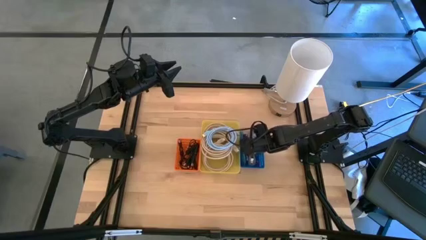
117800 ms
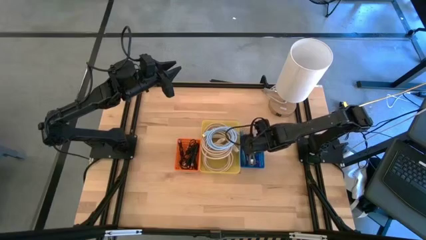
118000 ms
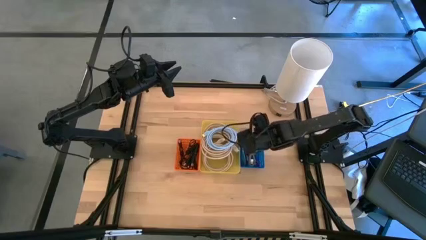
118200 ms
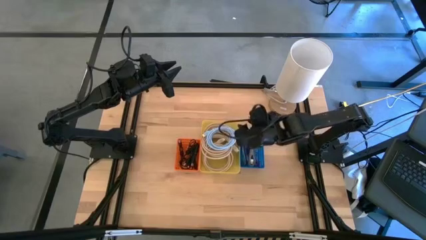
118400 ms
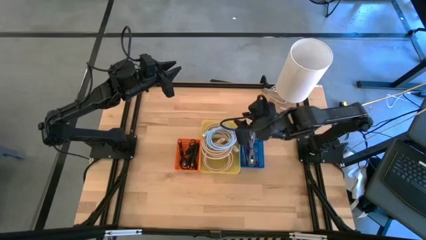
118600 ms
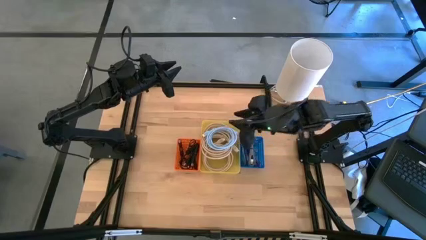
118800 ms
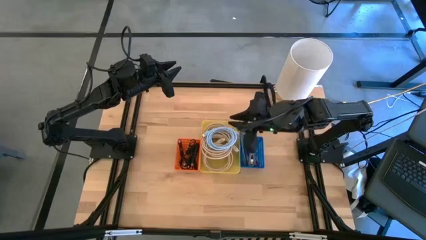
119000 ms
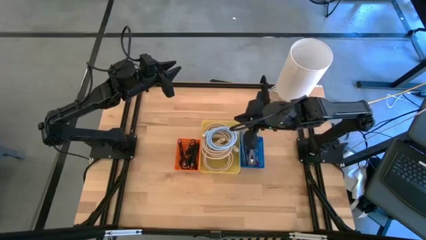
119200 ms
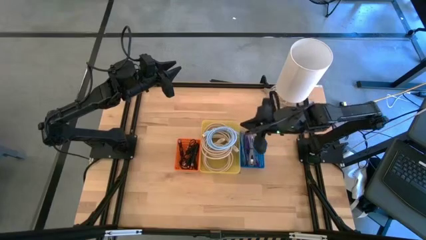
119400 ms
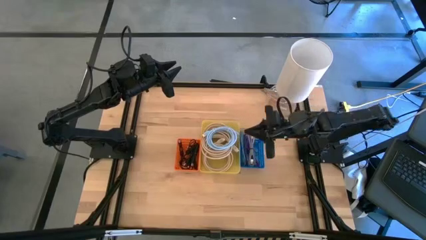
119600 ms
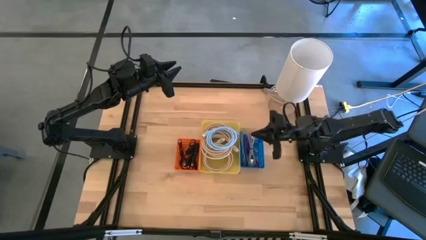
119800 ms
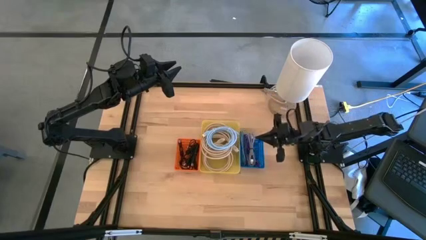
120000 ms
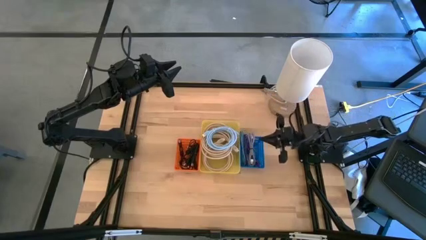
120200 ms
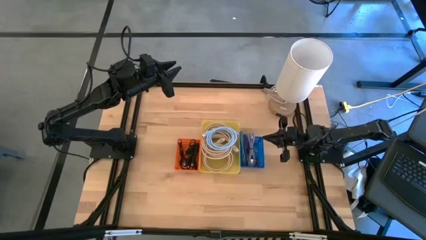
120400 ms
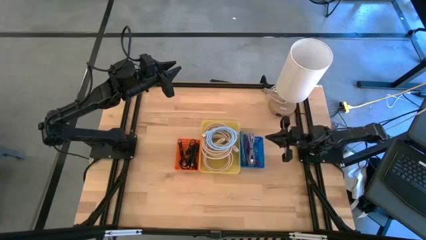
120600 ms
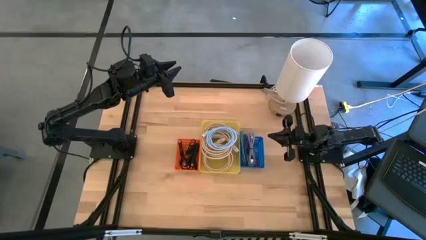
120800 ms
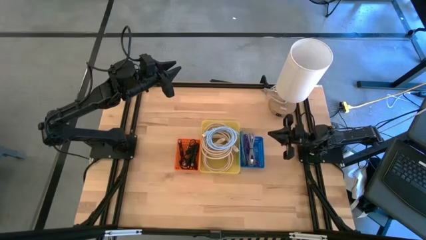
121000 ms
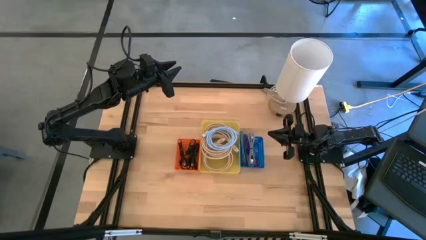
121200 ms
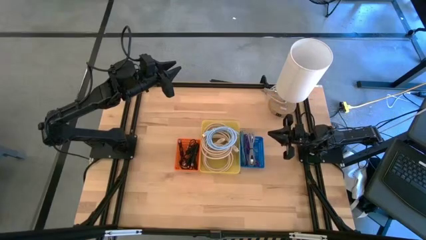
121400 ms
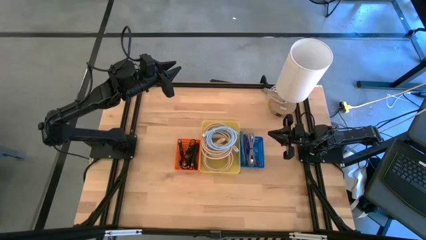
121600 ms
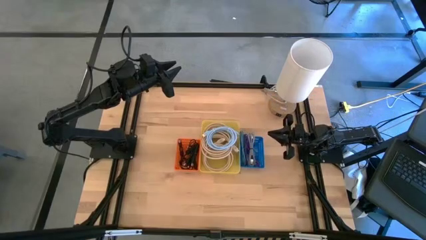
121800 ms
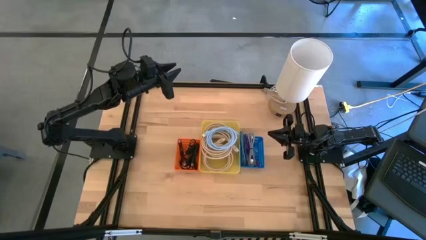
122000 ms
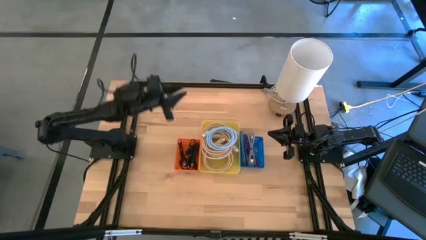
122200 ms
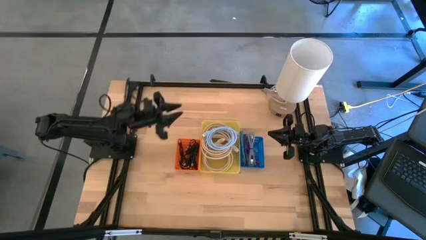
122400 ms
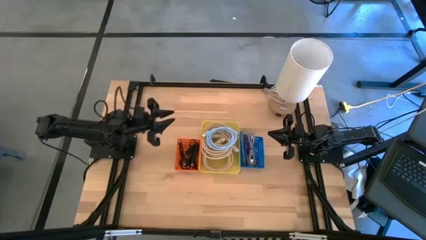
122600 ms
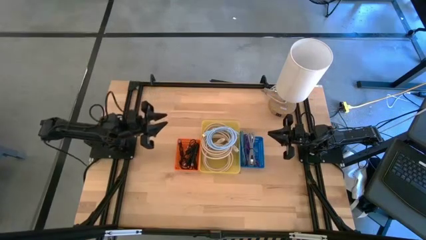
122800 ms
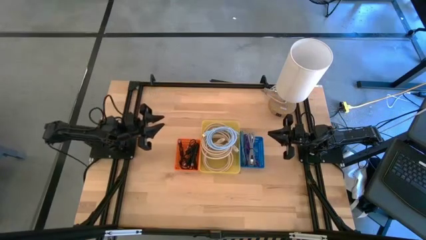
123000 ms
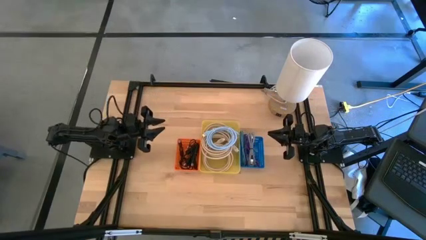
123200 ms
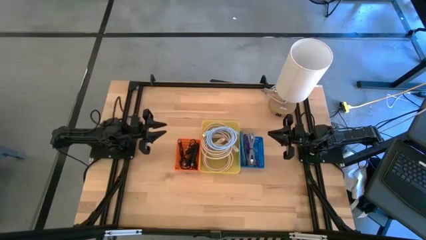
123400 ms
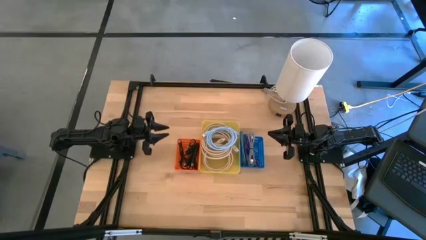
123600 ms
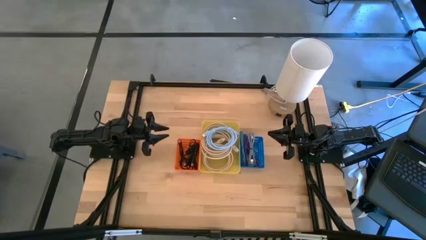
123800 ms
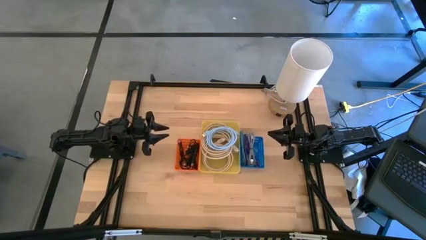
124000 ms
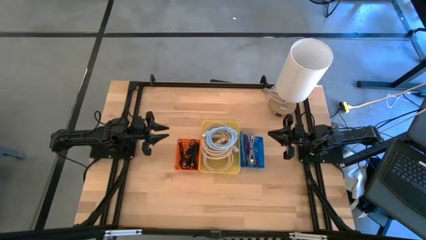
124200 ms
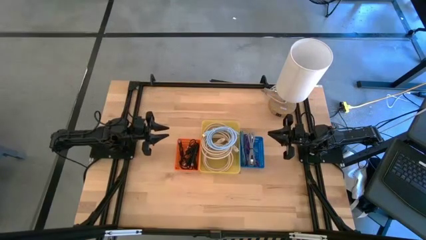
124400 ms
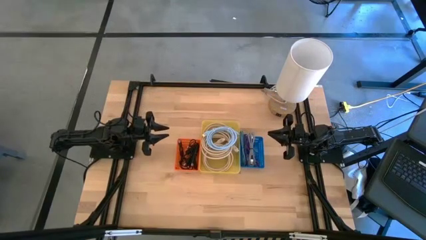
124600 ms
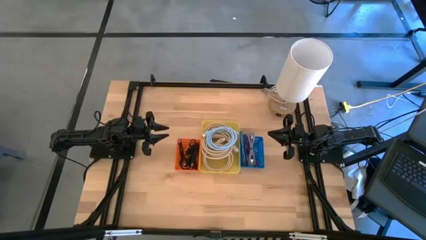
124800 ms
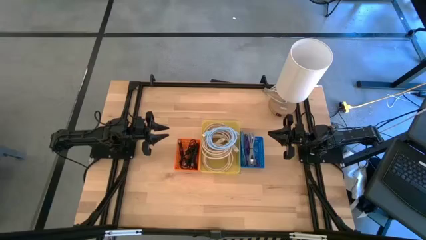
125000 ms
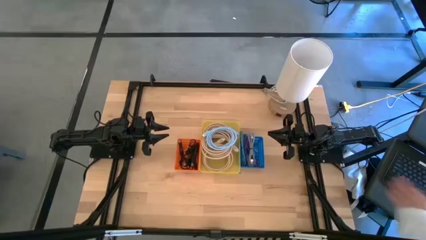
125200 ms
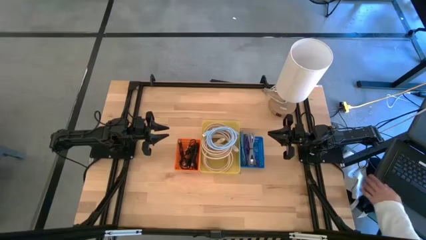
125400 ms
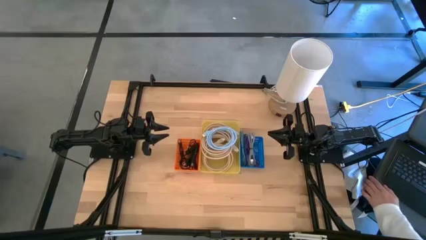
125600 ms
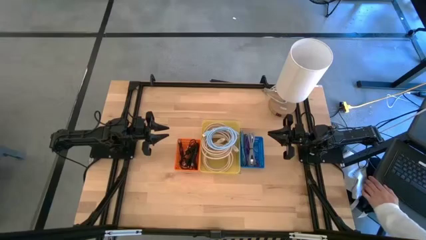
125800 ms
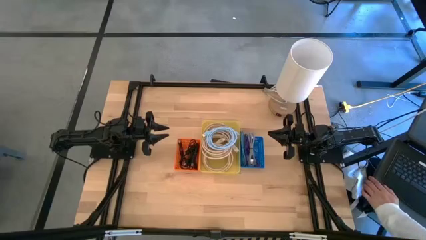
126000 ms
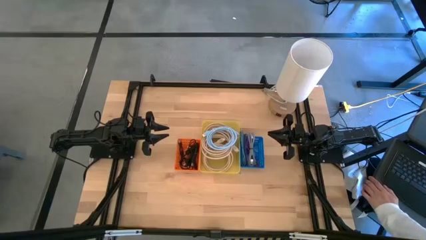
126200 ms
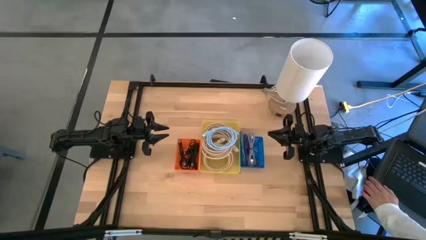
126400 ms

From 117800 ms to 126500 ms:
Task: Pick & Place USB Port
Return to Home Position

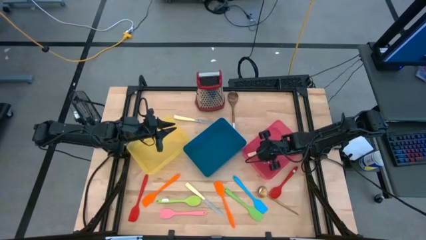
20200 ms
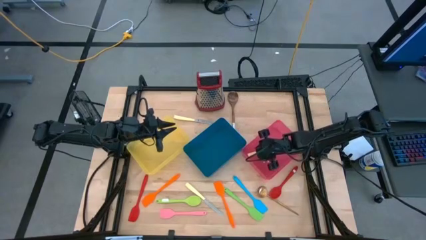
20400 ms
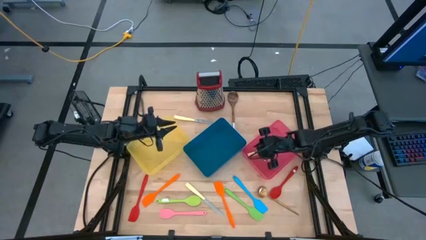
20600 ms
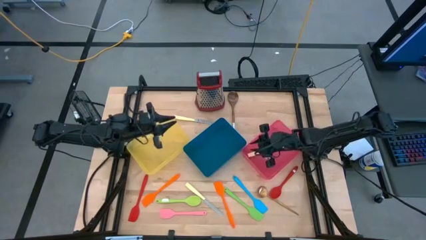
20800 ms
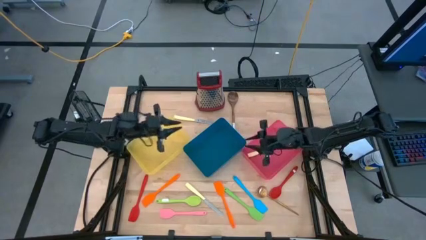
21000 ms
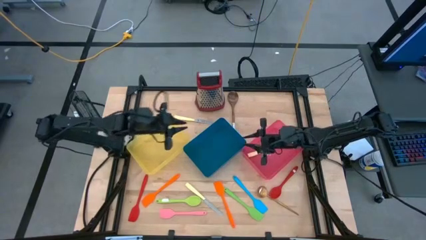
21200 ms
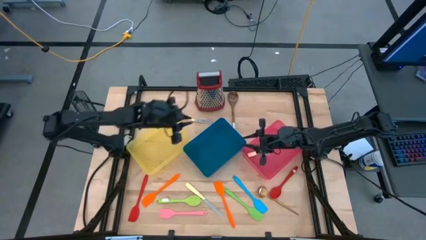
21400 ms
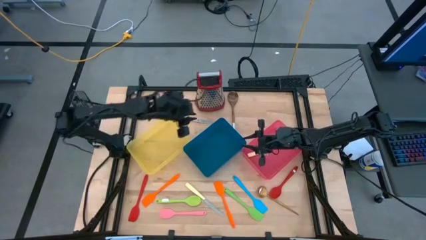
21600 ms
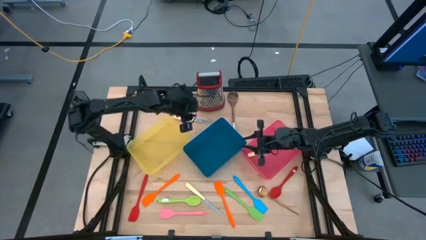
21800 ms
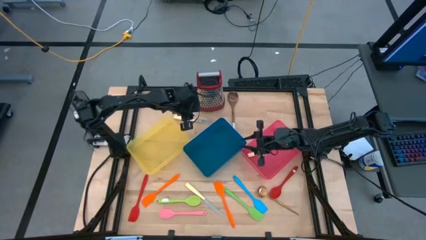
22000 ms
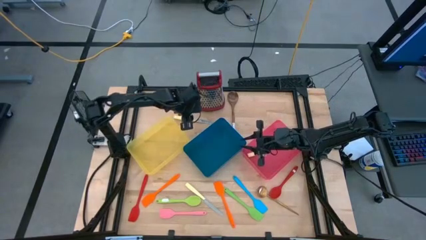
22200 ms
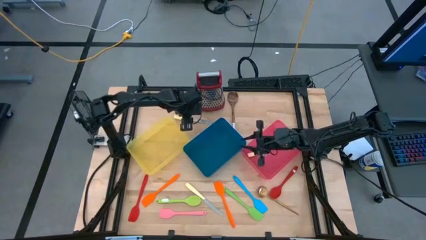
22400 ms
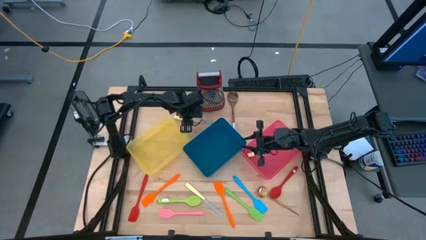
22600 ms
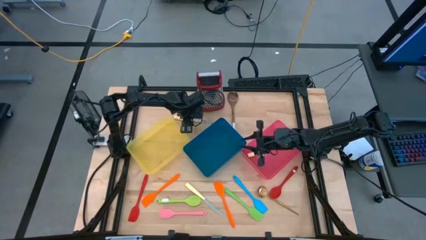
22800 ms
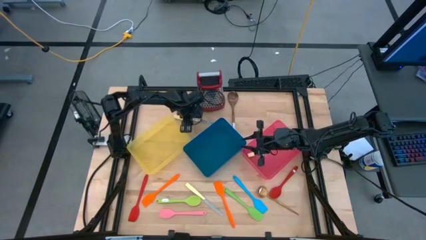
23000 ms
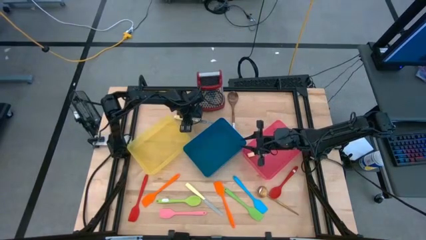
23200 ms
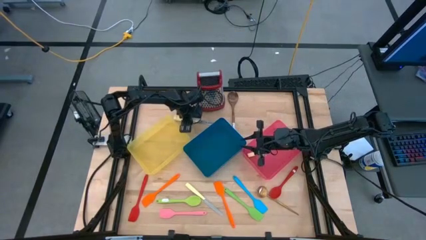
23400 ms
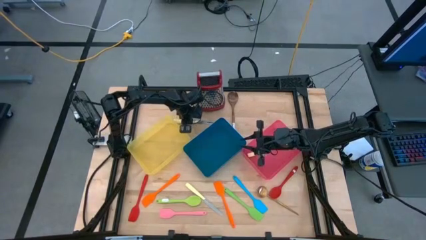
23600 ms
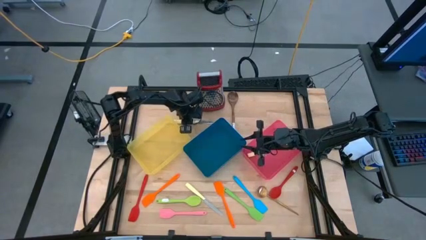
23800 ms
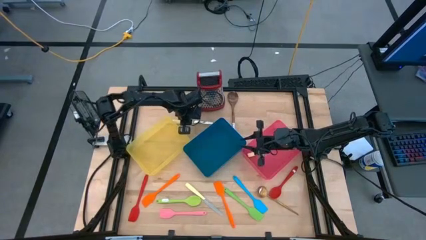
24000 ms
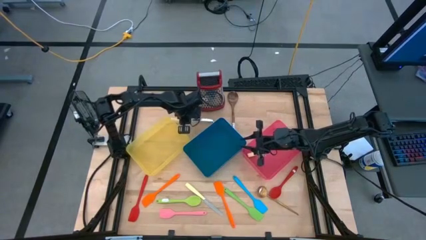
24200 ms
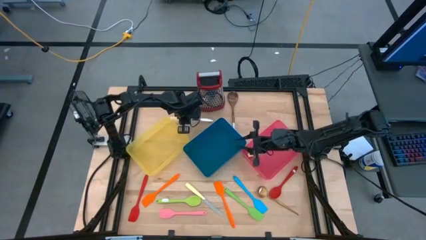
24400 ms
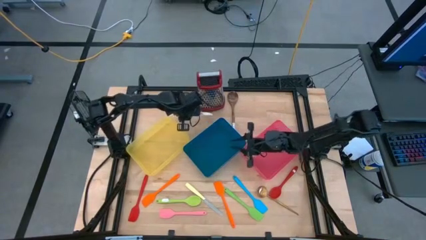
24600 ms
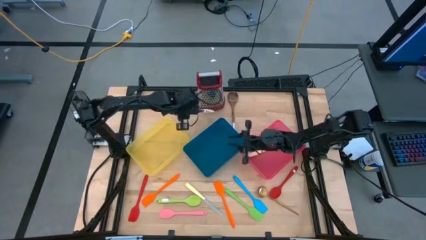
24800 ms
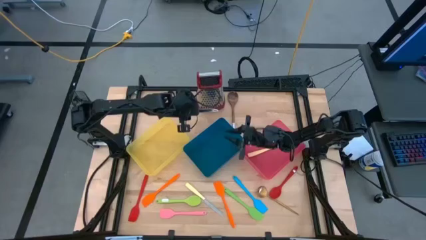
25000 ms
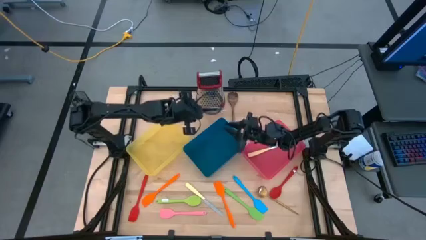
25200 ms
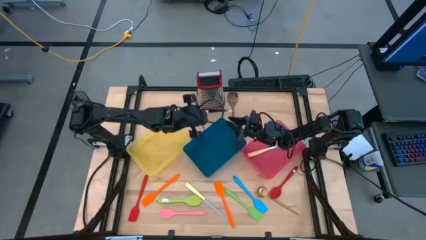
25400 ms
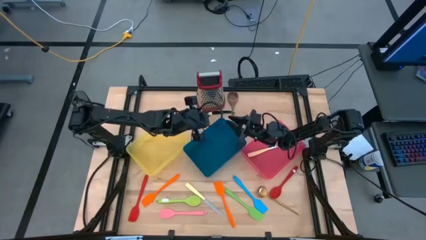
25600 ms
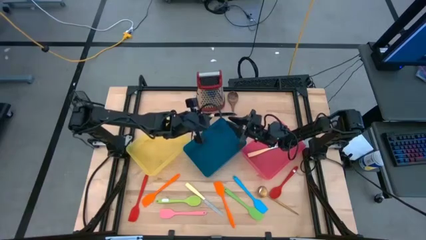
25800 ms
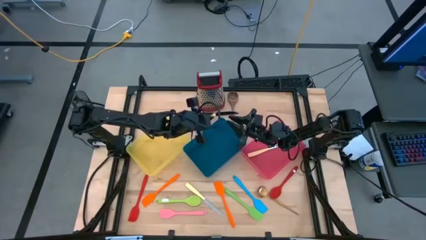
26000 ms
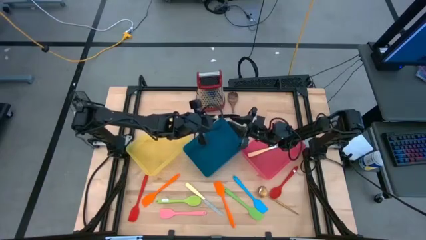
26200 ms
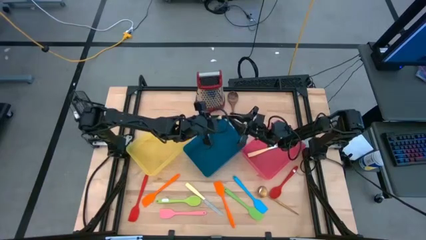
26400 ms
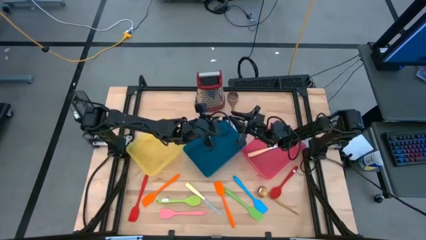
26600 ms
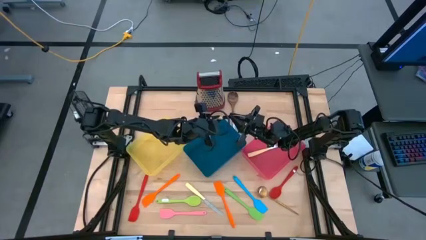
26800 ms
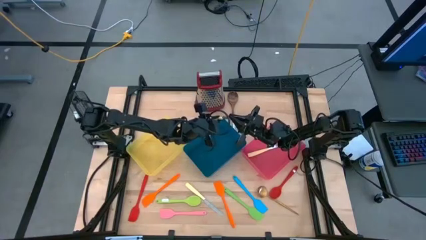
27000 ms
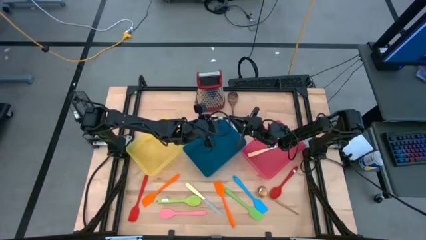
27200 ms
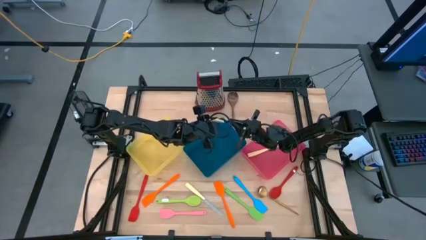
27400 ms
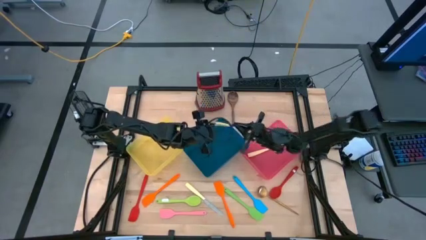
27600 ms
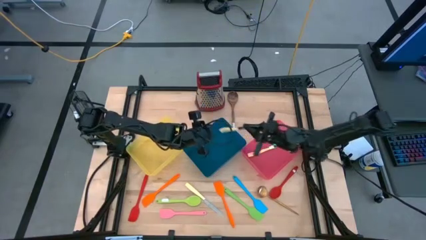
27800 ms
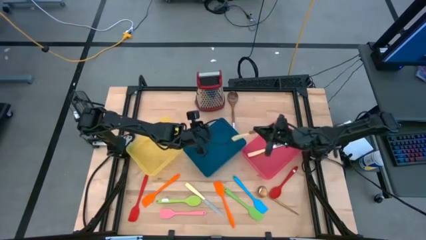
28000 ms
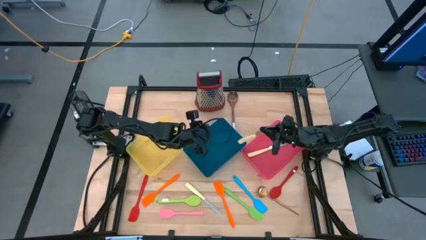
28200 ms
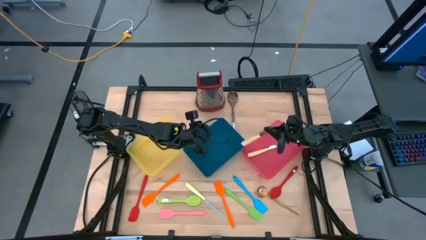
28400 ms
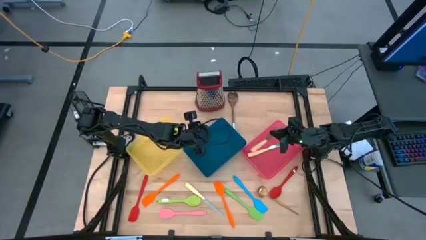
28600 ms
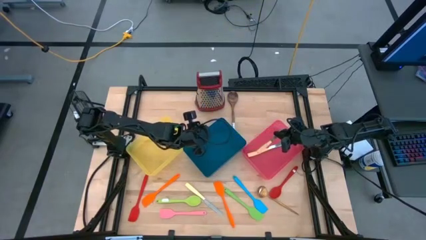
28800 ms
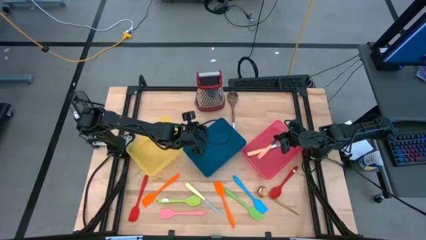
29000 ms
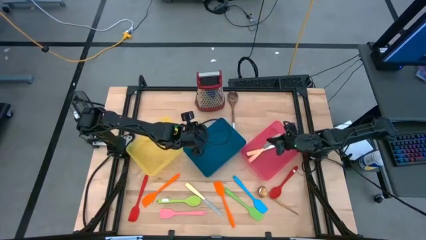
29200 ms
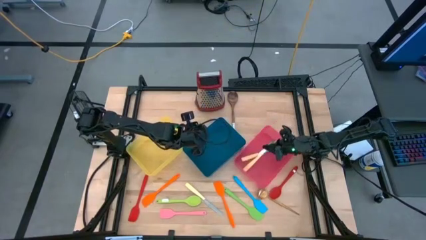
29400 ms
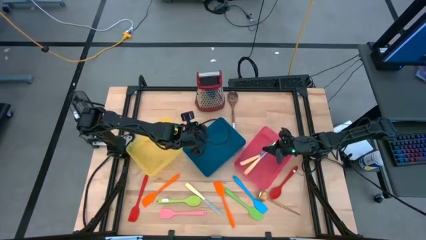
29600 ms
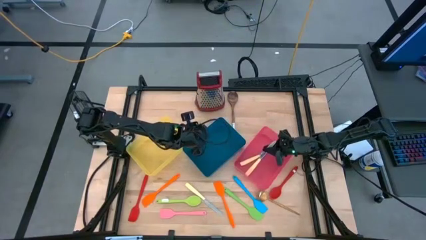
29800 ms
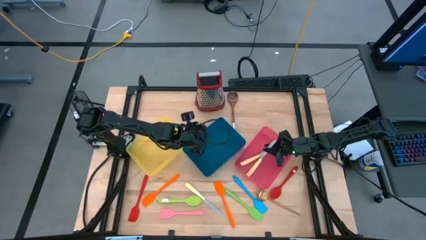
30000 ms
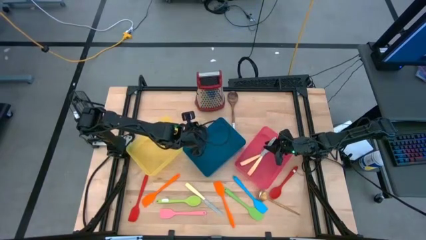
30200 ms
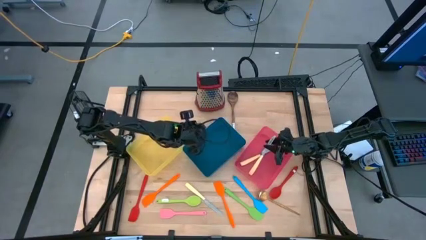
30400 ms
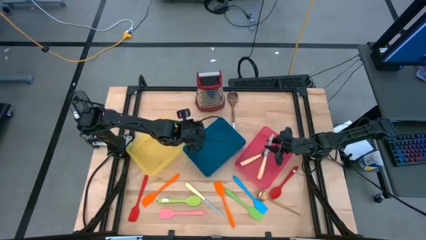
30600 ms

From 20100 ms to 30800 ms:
Task: Pick & Place Kitchen Items
Put the yellow table knife into the red bin
